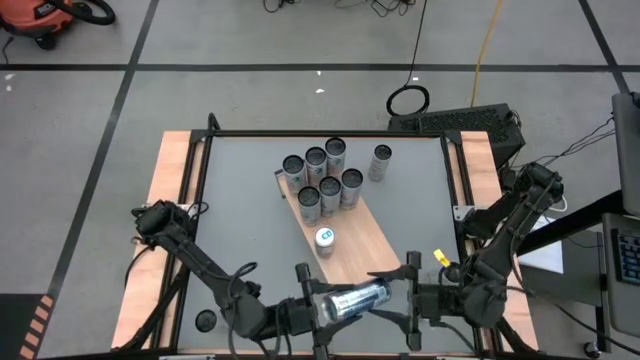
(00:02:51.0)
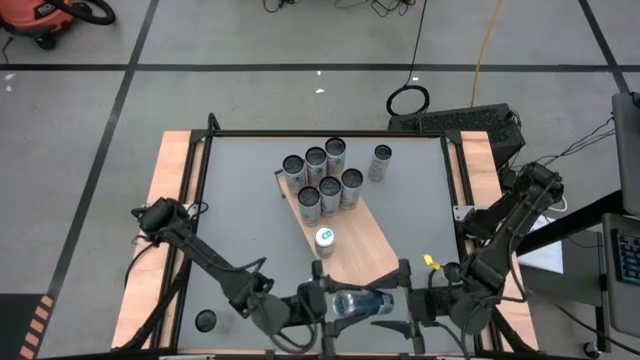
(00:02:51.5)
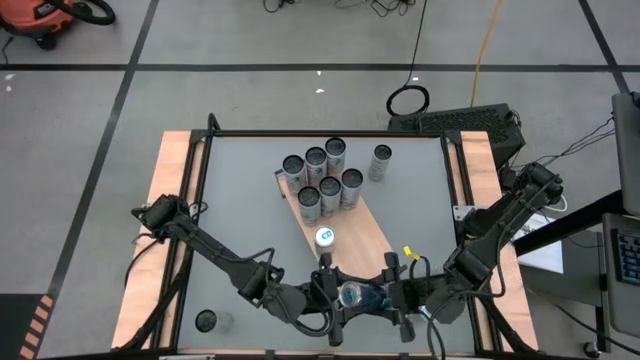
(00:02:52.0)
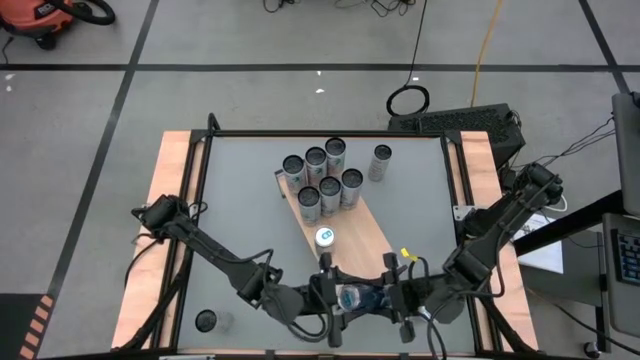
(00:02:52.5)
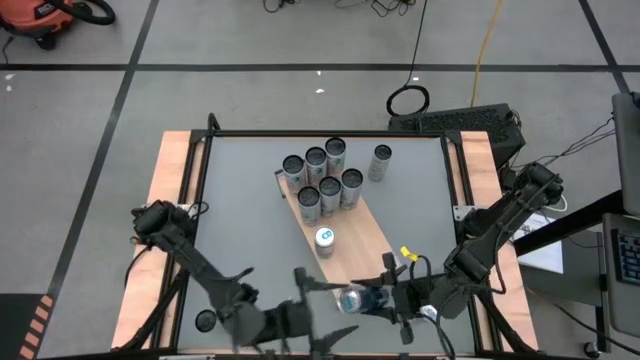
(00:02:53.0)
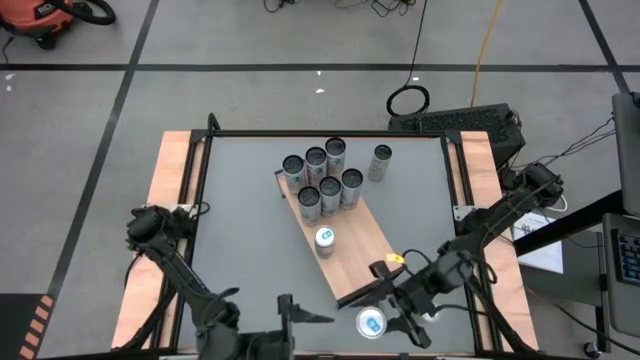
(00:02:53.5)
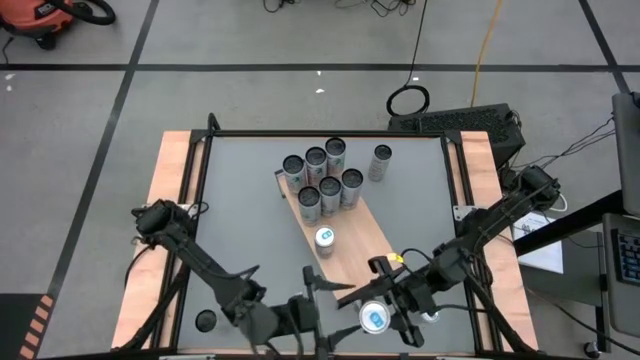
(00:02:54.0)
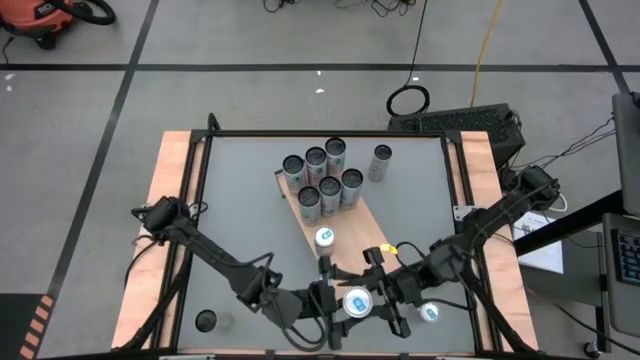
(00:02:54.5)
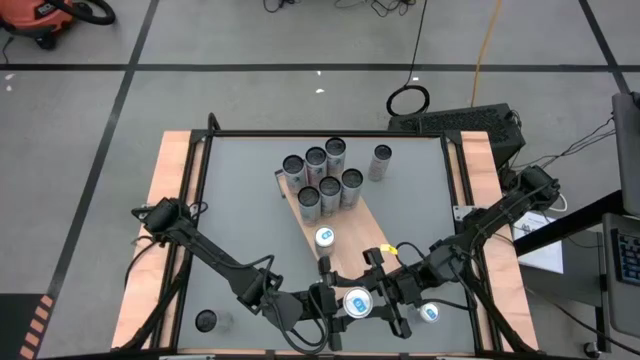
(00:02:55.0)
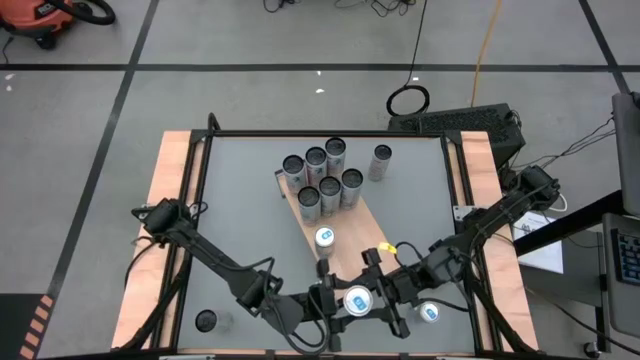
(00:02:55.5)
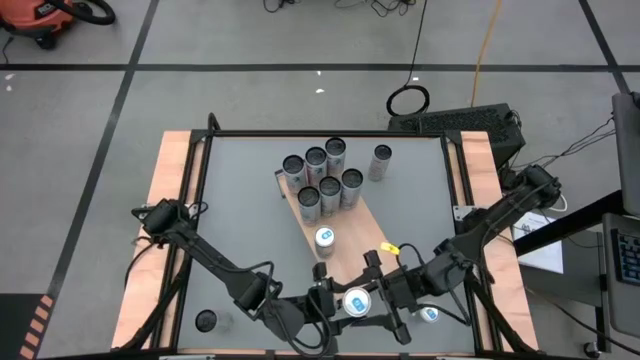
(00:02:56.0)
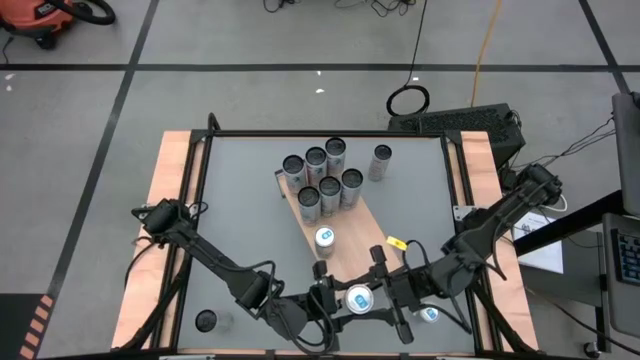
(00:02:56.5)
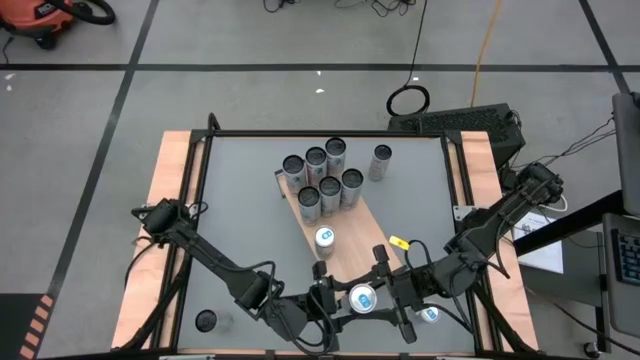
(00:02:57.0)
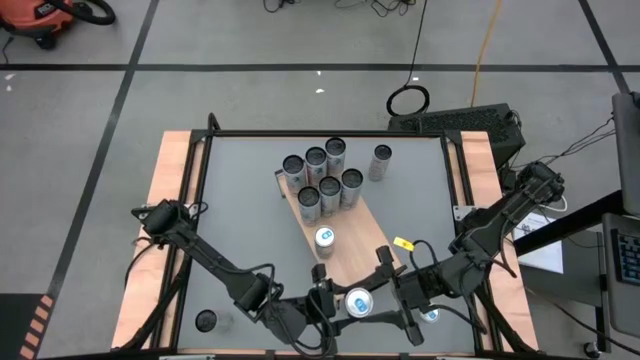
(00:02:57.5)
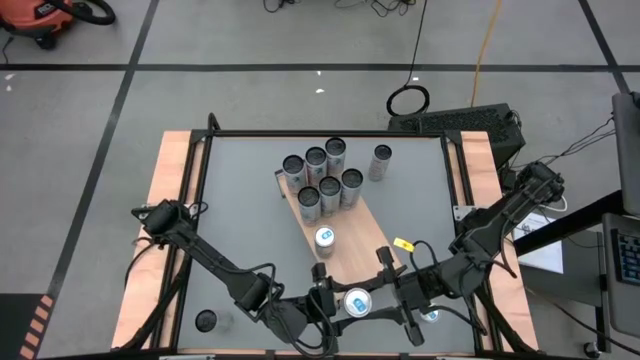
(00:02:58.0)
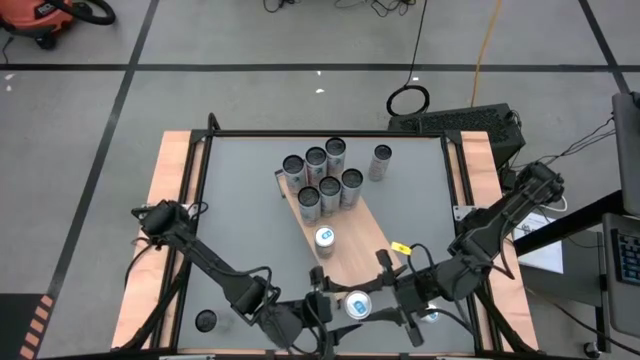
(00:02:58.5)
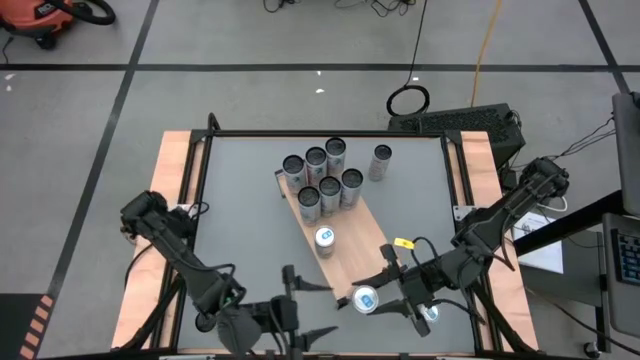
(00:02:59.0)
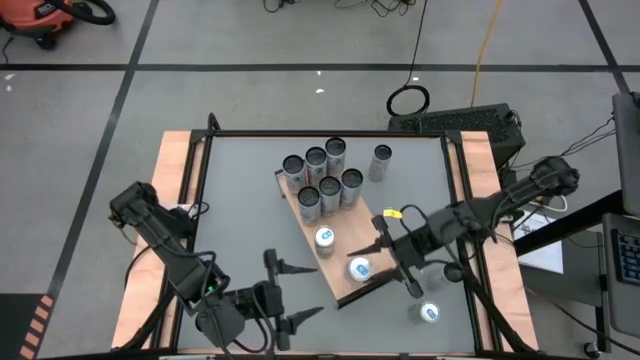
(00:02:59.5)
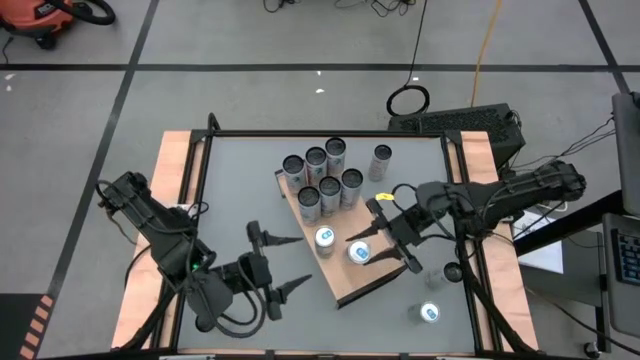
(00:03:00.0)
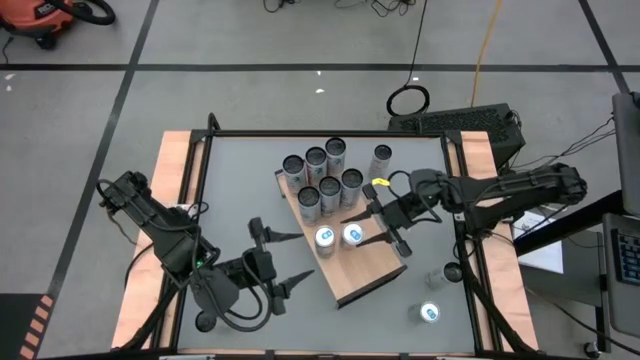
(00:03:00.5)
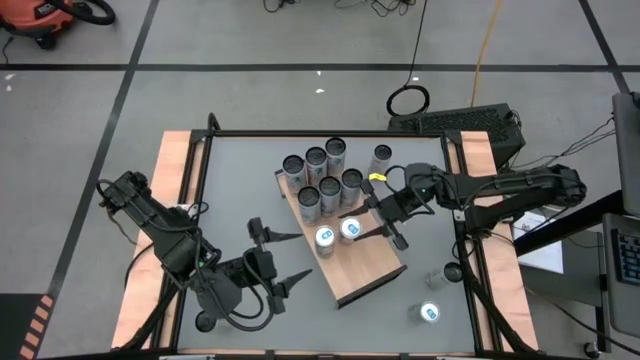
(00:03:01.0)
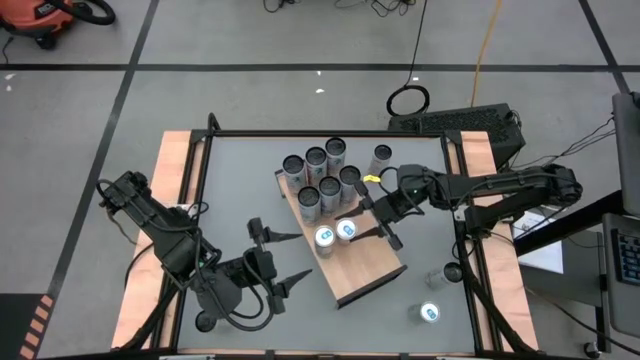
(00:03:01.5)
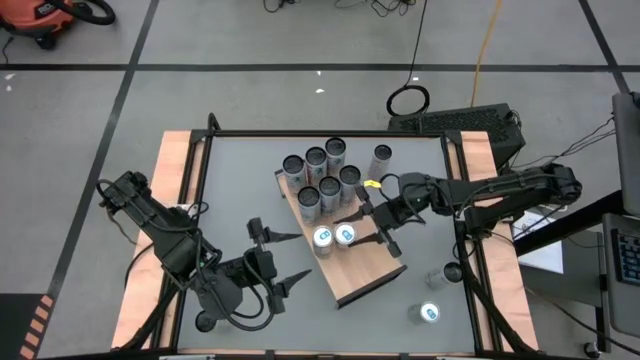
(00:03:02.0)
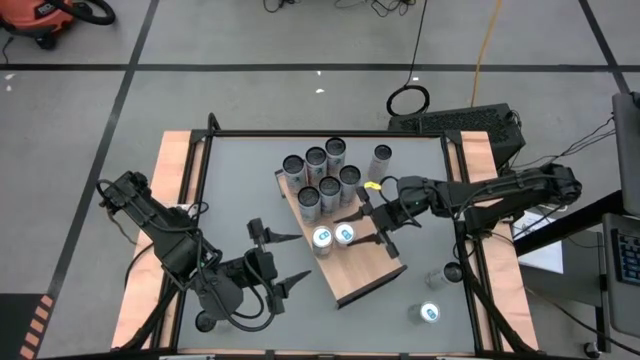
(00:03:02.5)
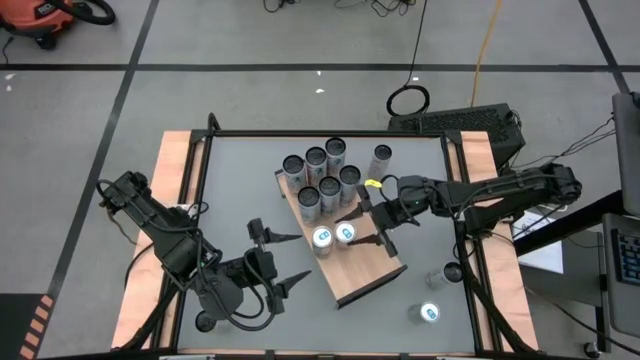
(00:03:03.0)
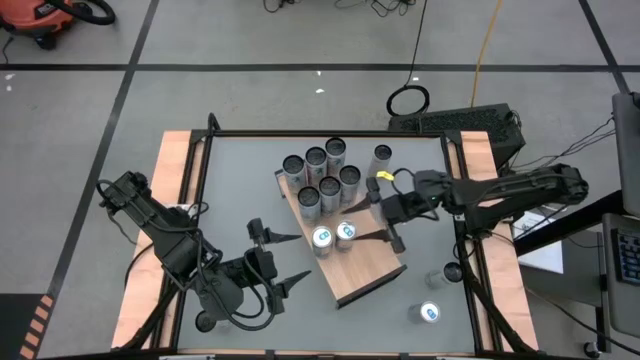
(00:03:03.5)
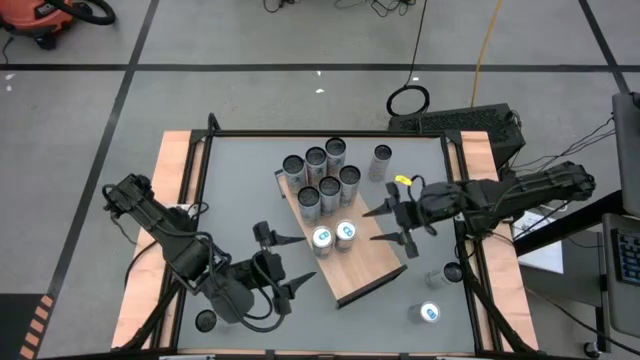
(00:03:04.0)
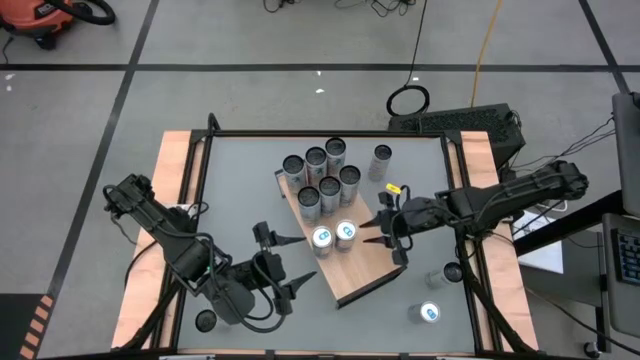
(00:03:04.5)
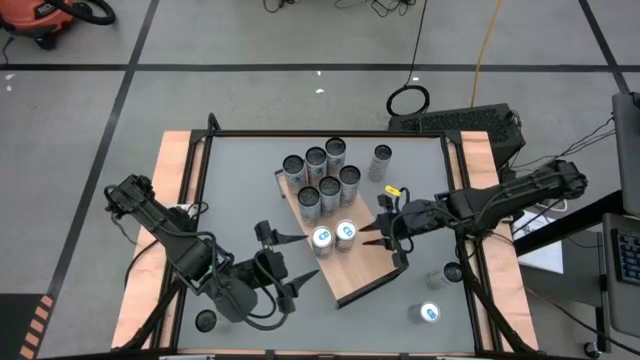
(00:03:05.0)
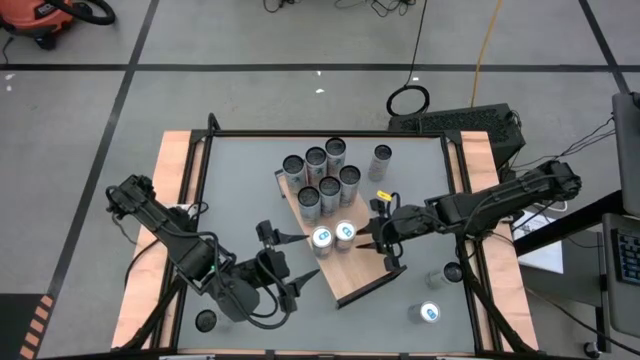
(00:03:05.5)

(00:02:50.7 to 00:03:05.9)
Task: Place canned beverage on shelf
Put the left blue soda can on the shelf aligned with the other blue soda can
